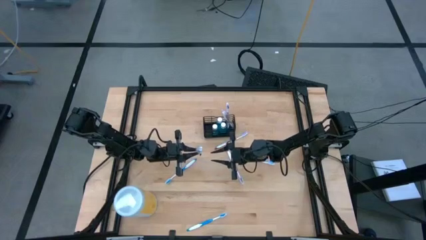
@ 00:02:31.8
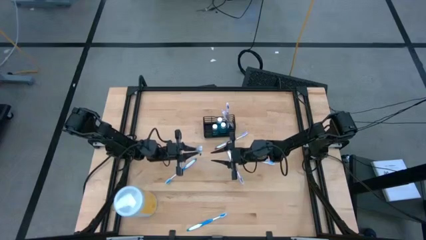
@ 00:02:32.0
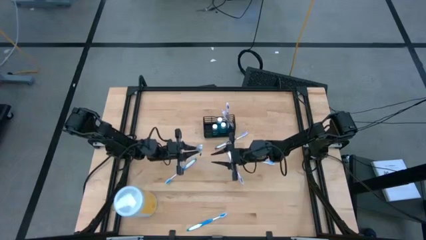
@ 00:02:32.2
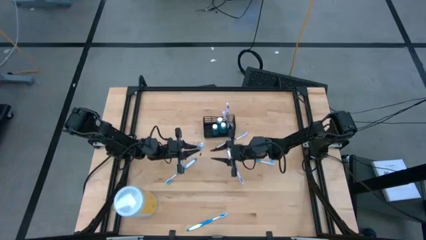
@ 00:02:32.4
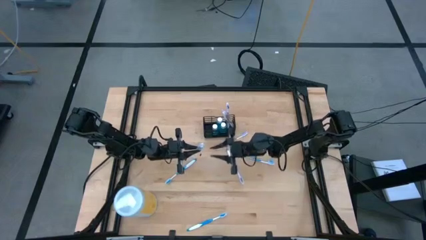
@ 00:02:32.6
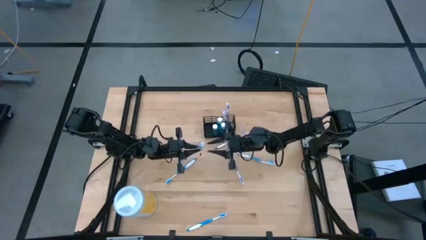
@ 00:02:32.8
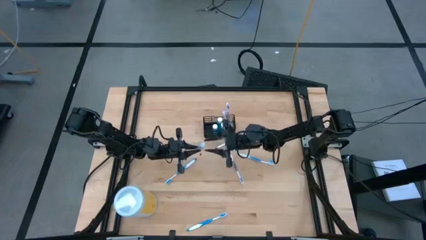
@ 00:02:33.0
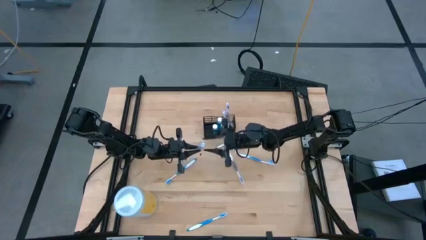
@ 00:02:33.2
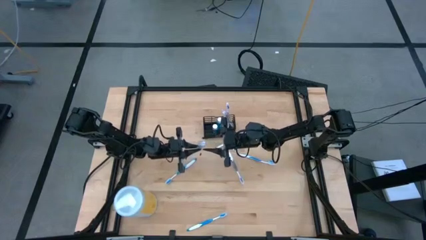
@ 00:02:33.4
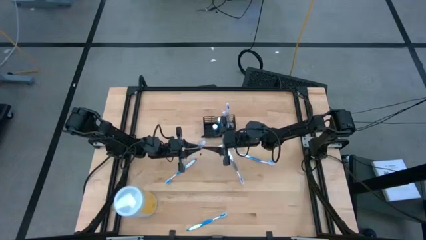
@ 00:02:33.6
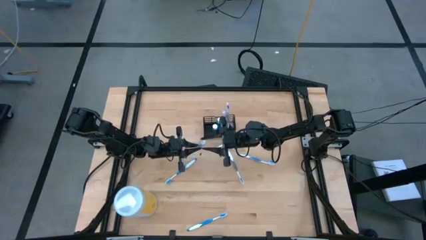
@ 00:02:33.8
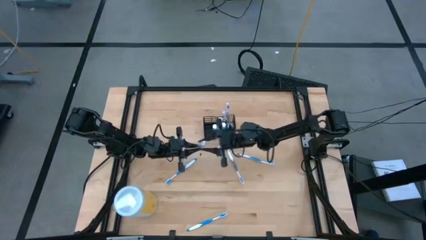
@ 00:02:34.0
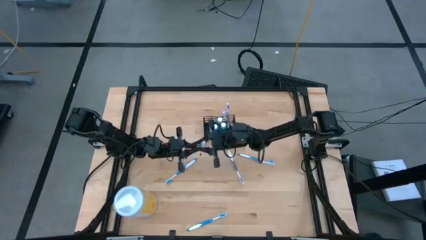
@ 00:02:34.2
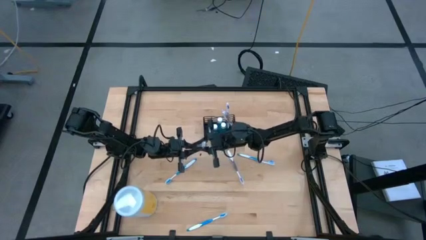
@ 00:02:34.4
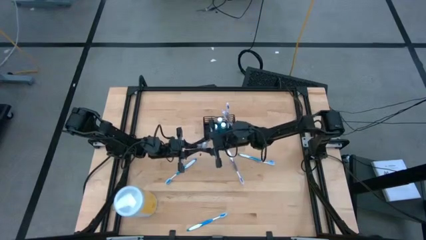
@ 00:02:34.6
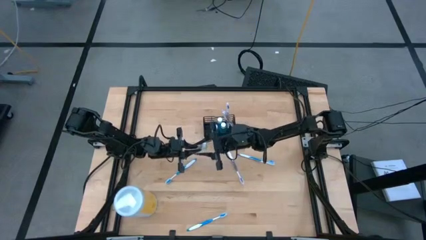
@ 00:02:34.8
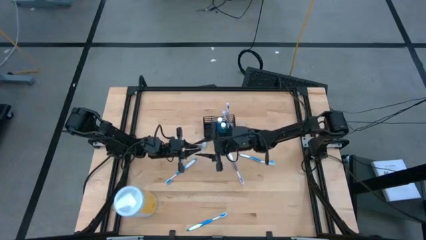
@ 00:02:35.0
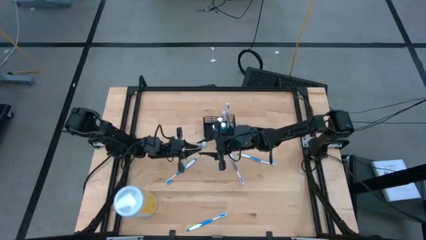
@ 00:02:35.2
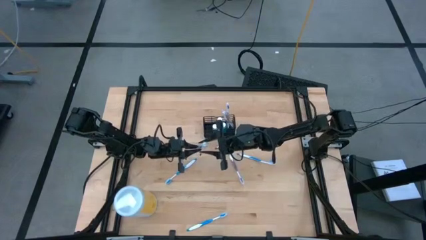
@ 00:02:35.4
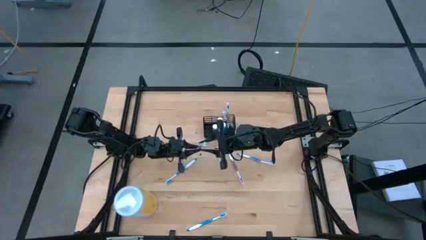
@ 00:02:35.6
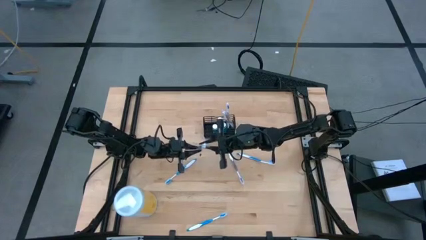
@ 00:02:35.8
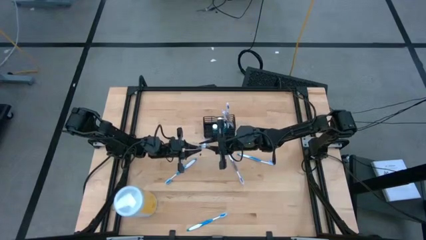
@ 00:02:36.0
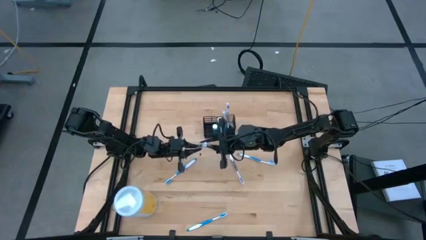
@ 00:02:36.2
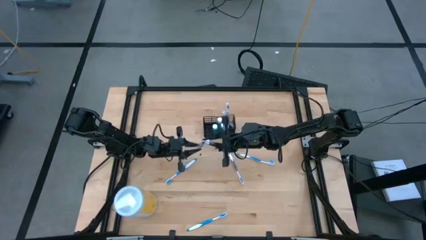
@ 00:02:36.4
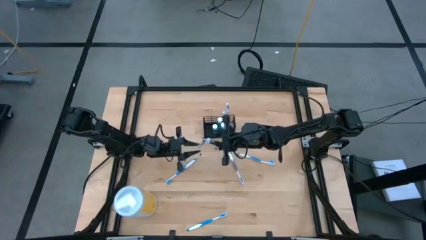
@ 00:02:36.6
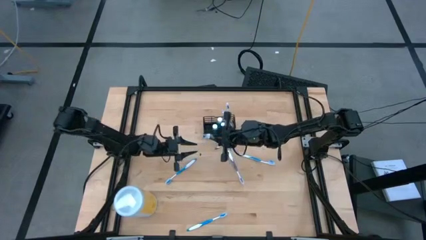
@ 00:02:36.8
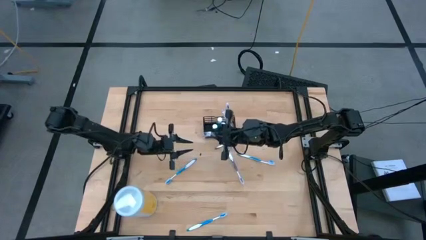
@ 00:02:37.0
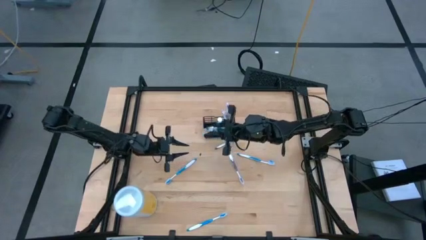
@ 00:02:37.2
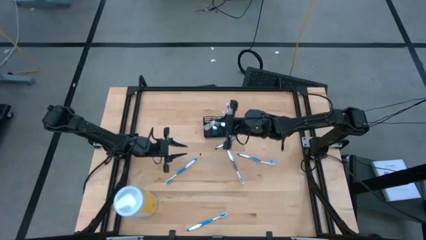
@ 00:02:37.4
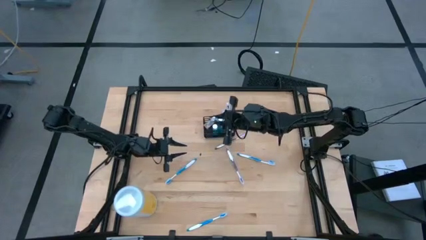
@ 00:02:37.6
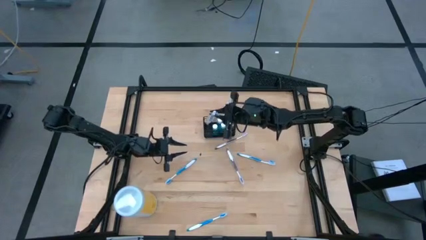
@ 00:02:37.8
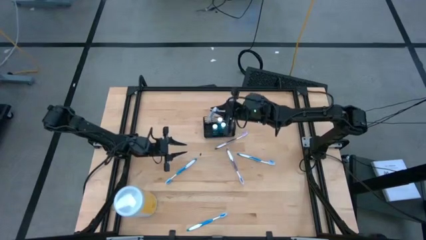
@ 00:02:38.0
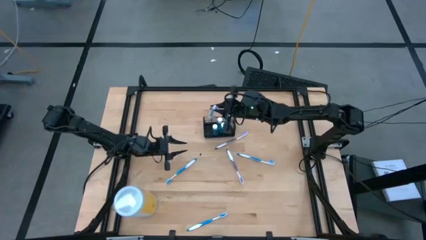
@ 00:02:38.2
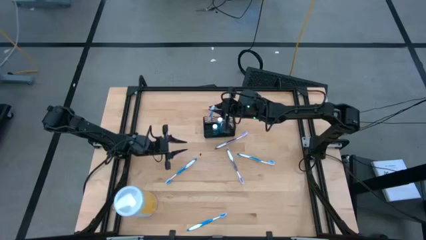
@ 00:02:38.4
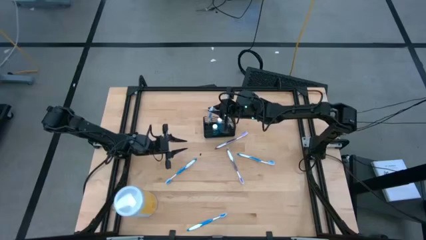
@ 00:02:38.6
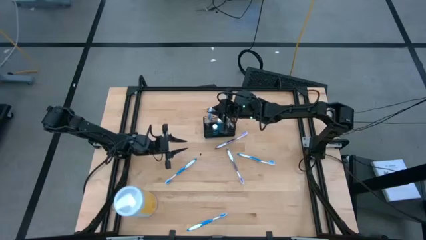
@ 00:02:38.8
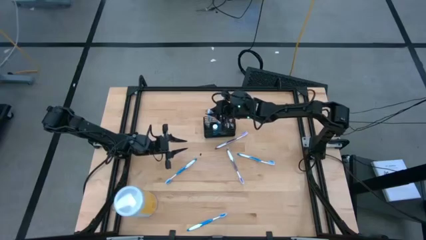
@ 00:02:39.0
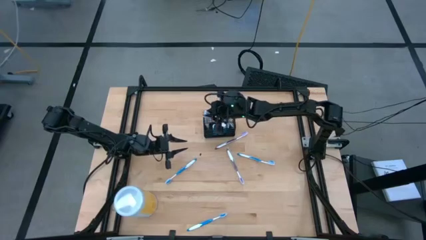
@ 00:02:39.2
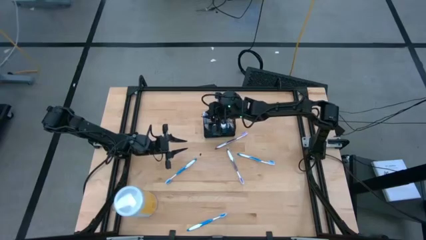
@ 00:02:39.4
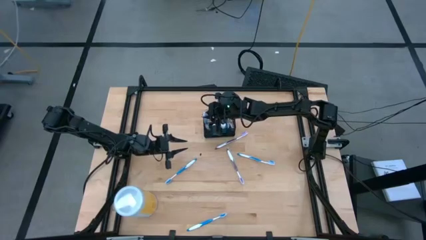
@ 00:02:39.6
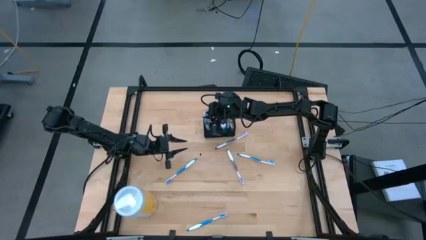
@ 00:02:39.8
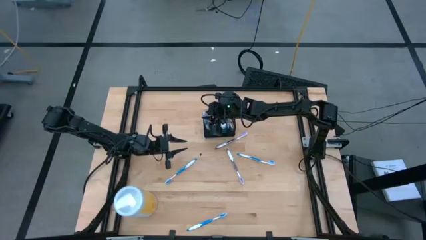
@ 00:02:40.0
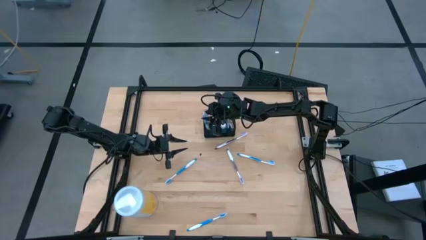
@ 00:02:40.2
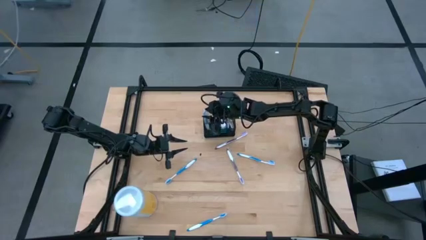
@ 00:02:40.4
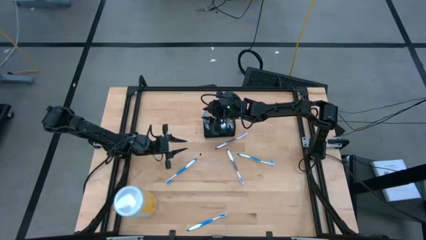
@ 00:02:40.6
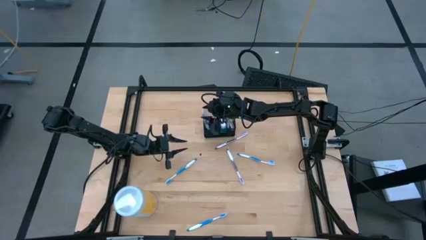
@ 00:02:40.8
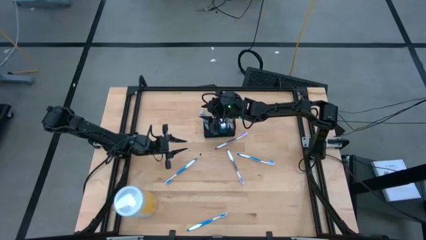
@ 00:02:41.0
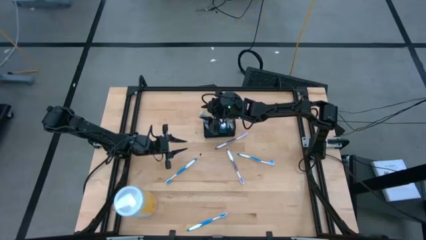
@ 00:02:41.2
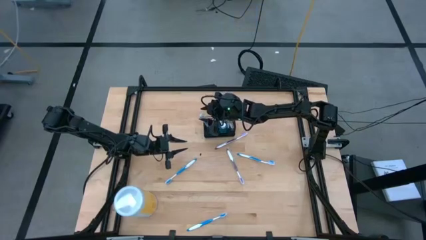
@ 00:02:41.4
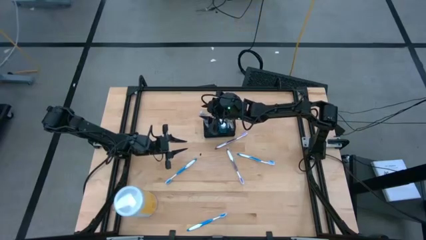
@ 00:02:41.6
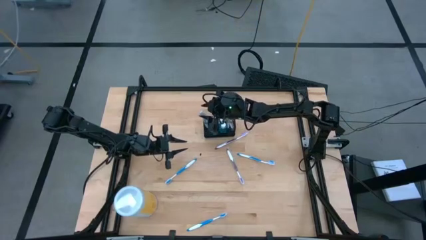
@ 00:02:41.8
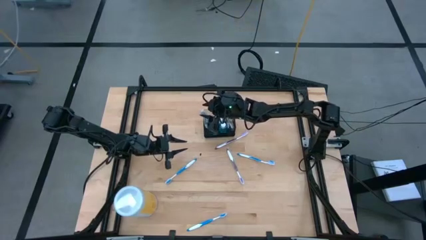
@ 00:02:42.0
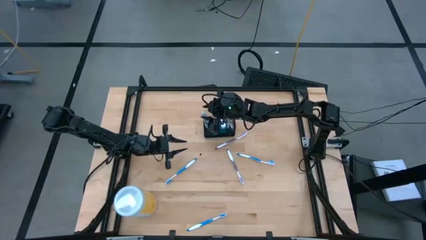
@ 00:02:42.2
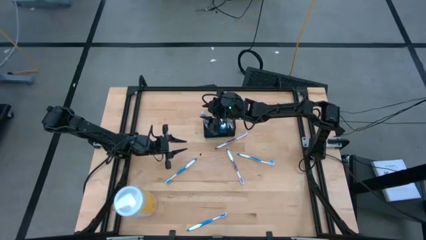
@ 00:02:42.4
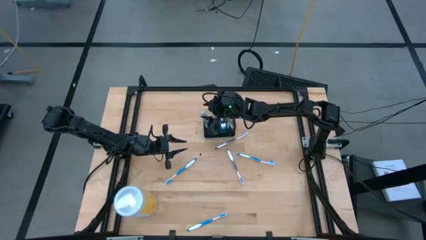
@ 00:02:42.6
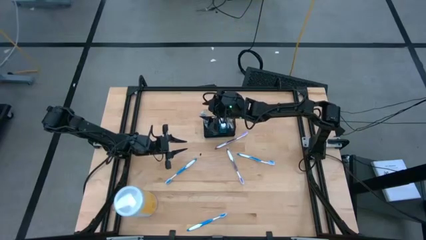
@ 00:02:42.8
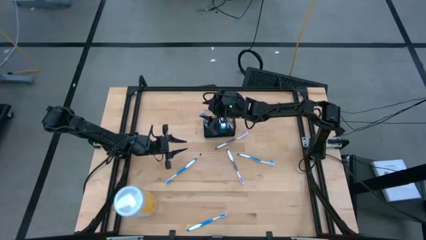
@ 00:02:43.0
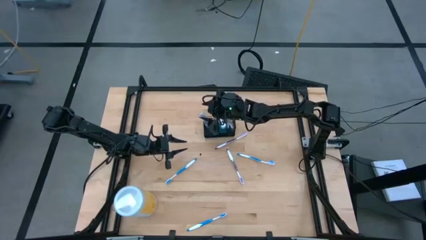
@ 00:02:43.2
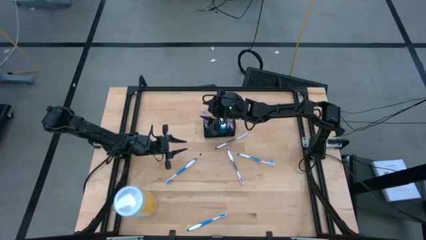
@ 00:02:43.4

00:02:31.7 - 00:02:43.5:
Task: Pick & Place toothbrushing station
Put the blue toothbrush into the black organizer
